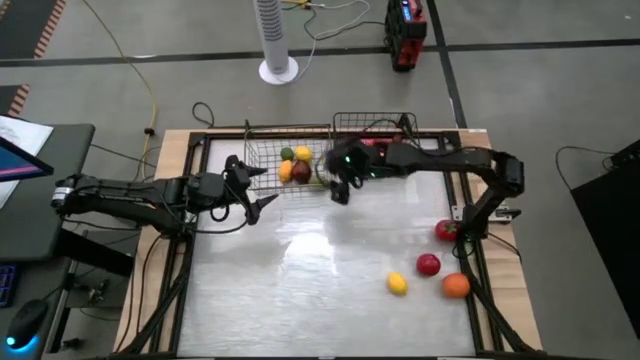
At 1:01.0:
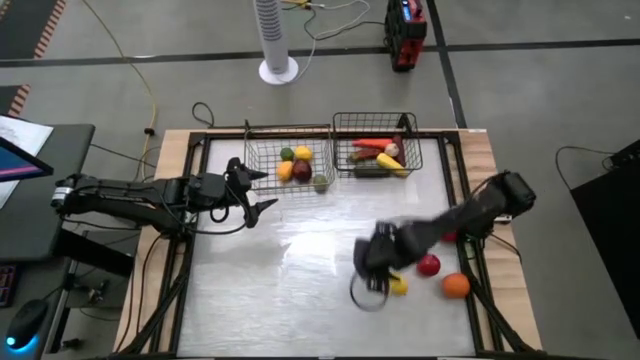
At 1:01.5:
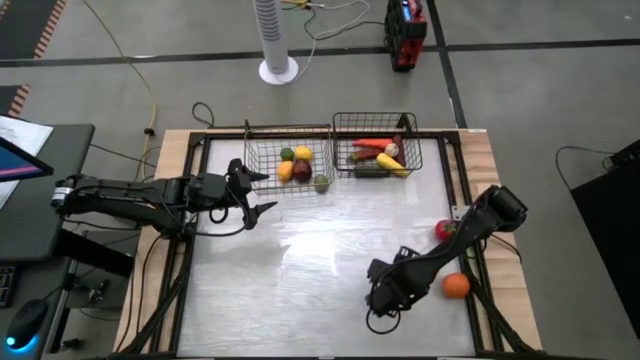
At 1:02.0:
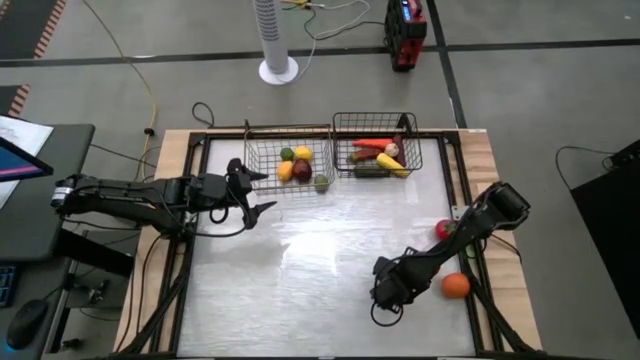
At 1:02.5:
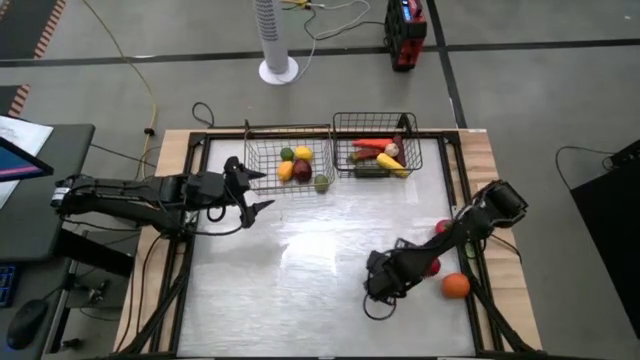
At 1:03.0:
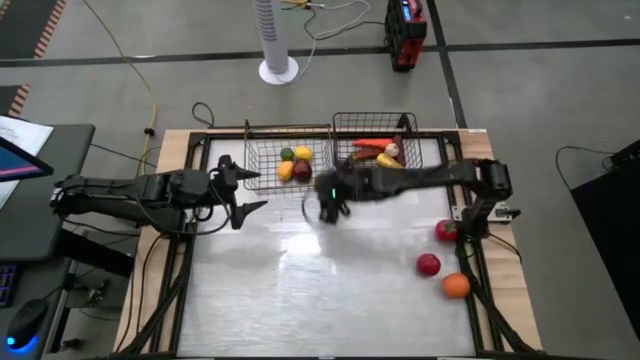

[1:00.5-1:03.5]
Task: Sort produce into baskets
Put the lemon into the left wire basket

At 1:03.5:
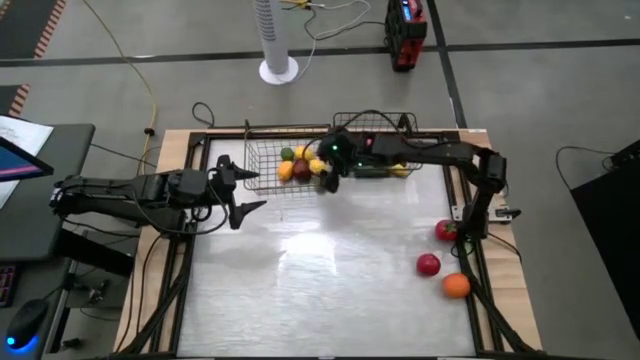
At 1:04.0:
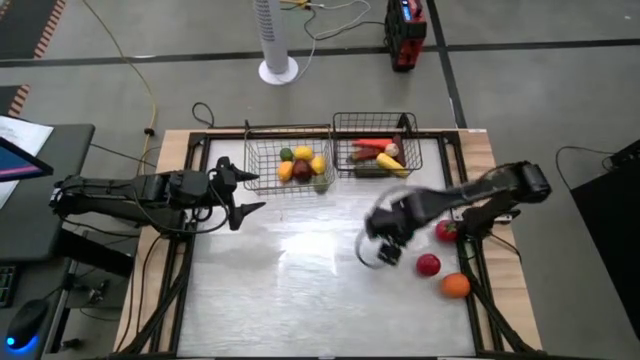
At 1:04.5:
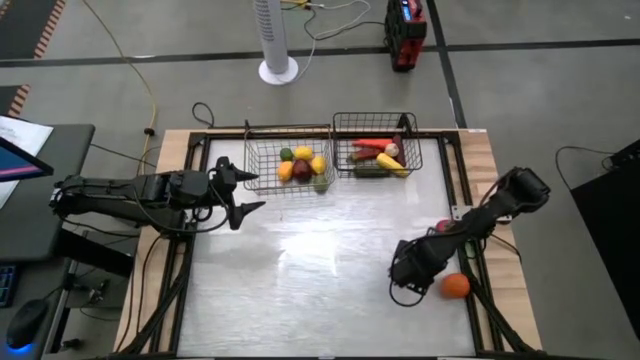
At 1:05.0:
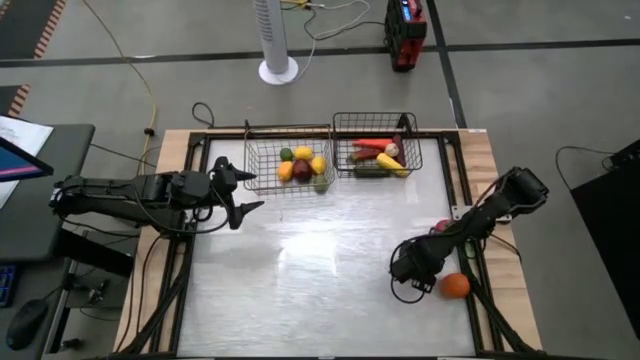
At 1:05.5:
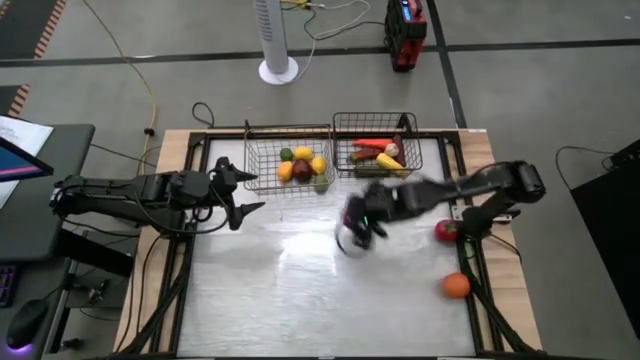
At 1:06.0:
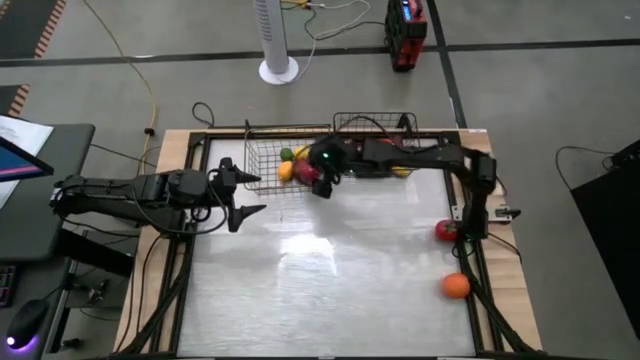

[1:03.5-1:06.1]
Put the tomato into the left wire basket

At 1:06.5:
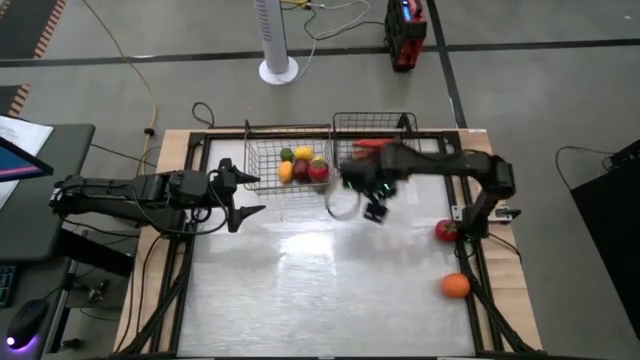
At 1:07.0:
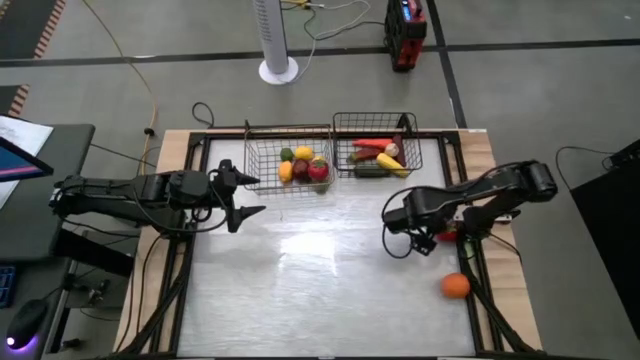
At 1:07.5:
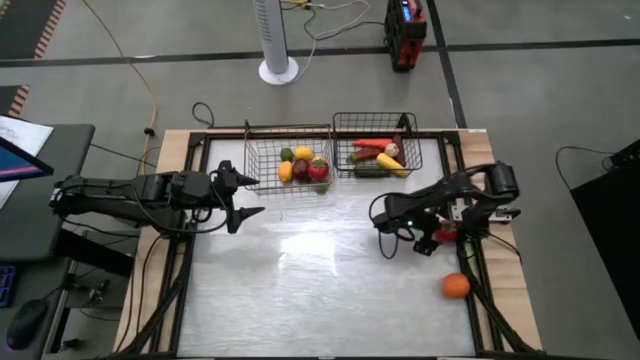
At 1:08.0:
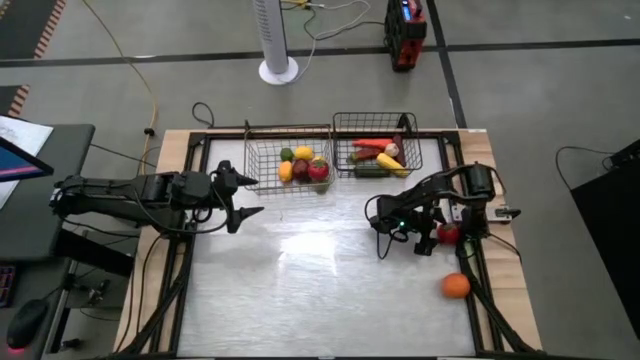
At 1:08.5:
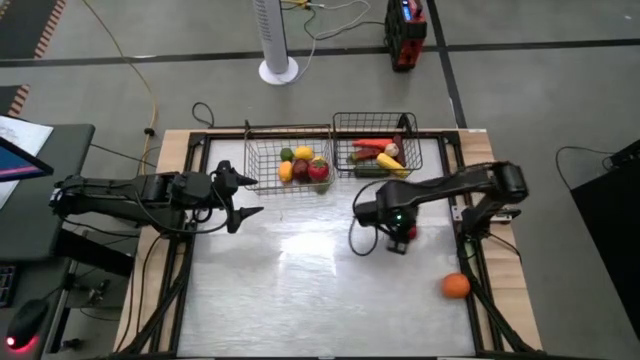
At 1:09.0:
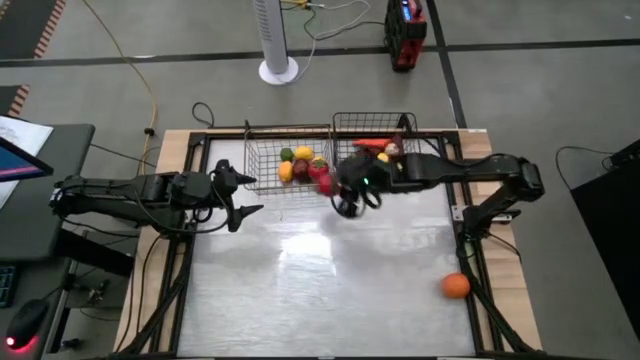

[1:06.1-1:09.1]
Put the tomato into the left wire basket

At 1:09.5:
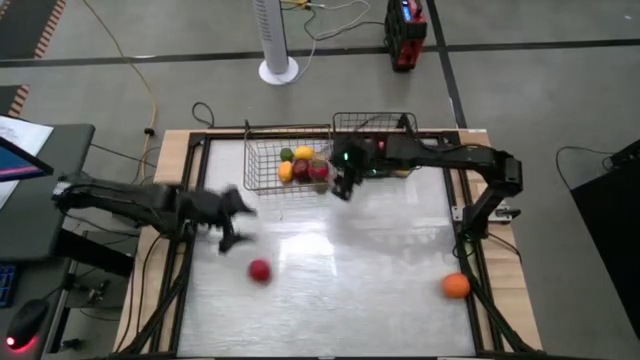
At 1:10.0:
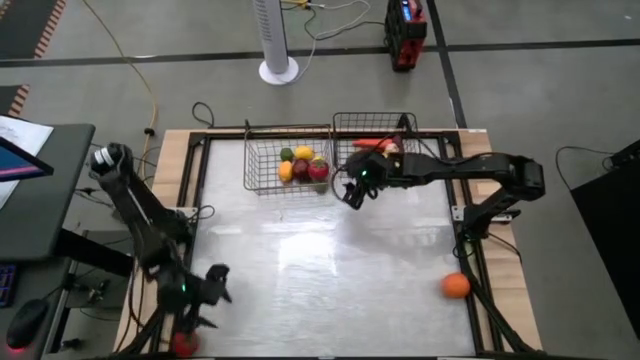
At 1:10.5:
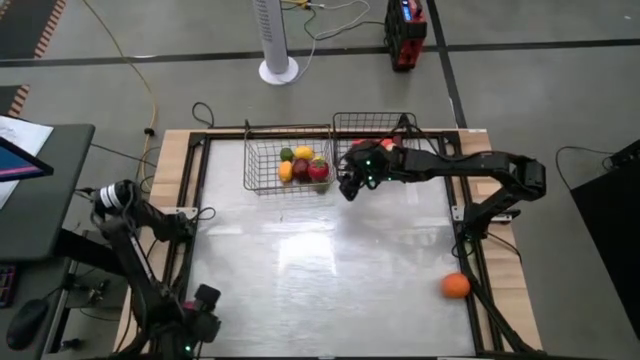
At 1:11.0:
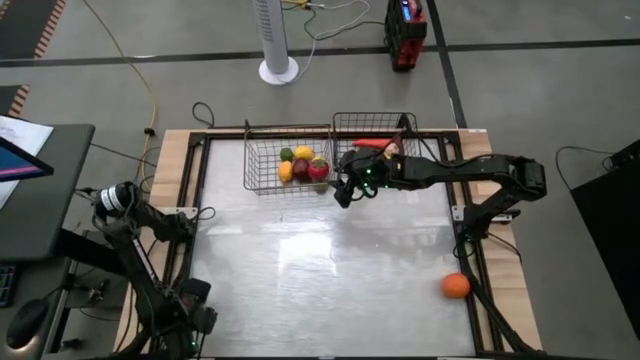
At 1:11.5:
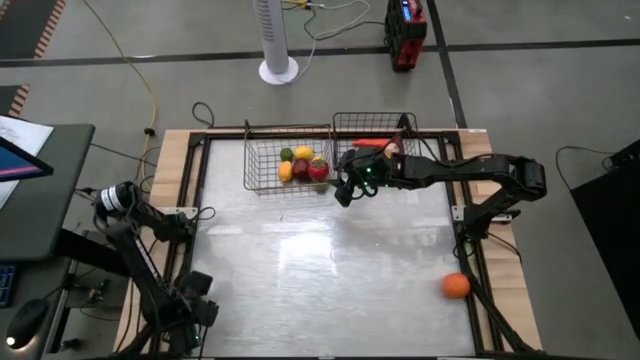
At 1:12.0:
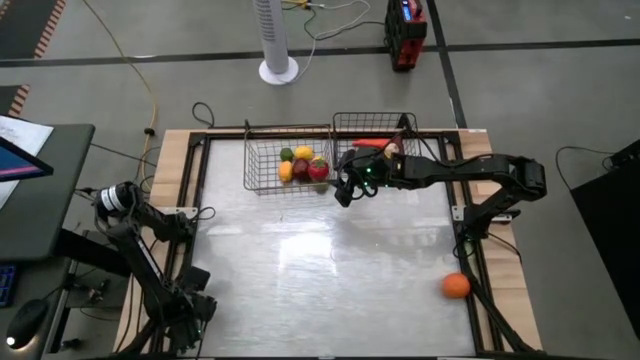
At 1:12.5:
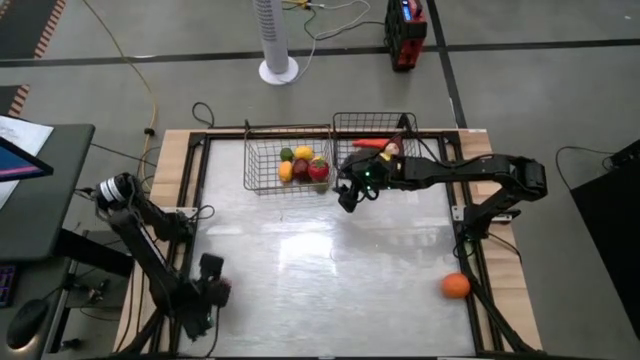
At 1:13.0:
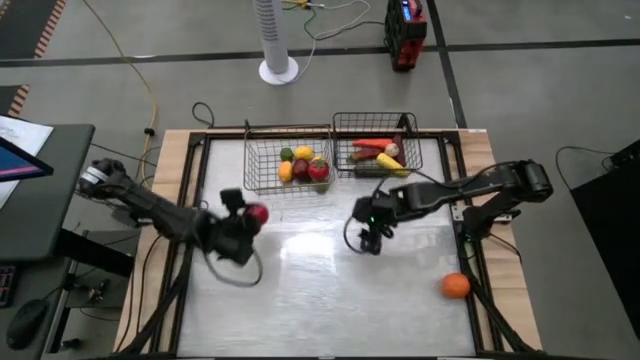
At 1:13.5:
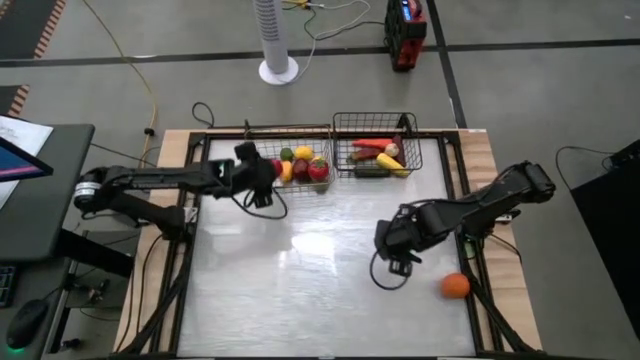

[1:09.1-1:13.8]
Put the tomato into the left wire basket

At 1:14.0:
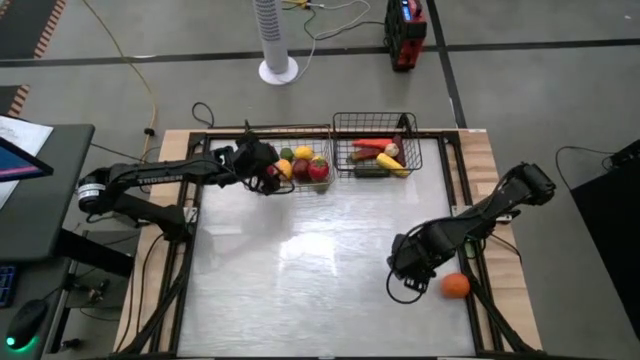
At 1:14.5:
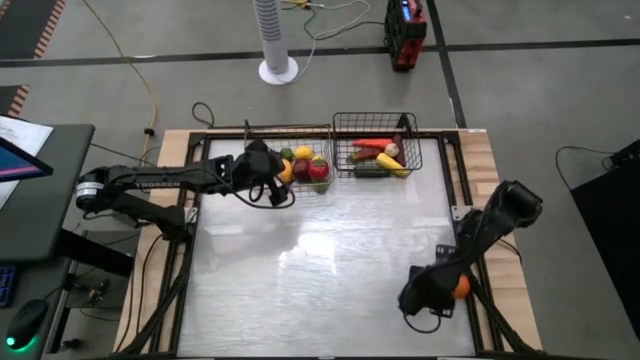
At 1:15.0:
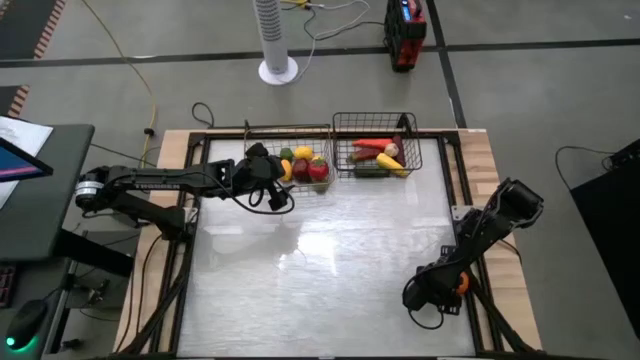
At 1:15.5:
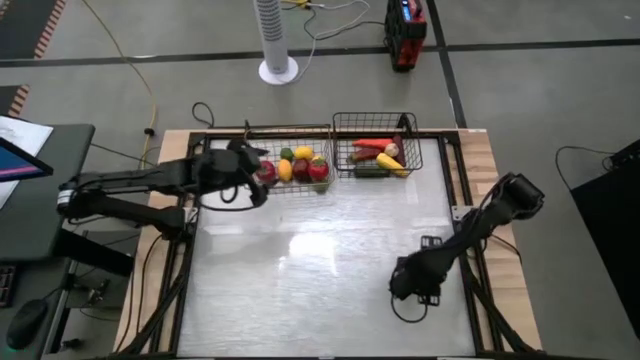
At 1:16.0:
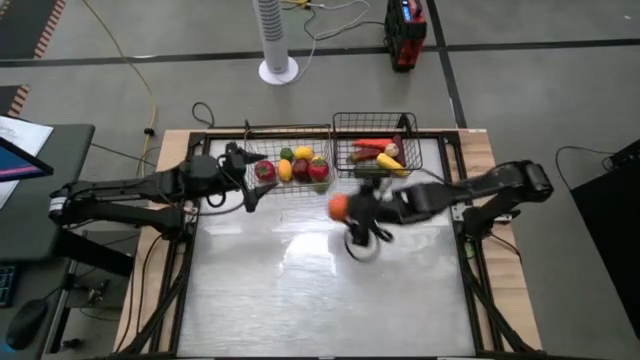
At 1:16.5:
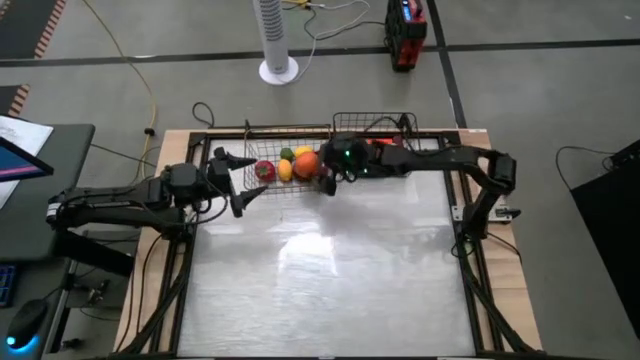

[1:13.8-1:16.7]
Put the orange into the left wire basket

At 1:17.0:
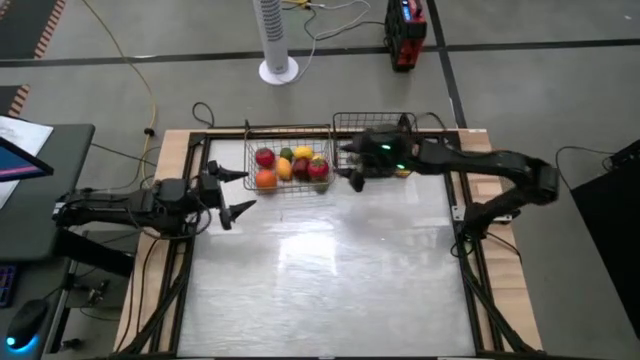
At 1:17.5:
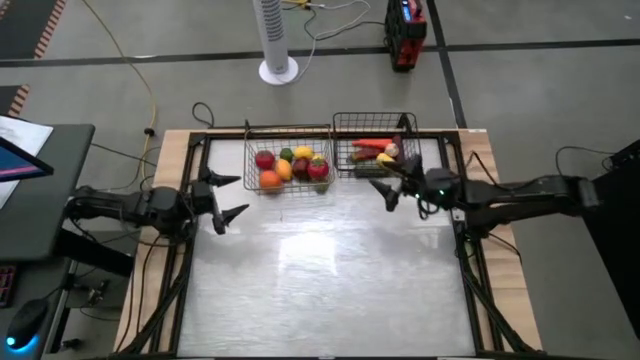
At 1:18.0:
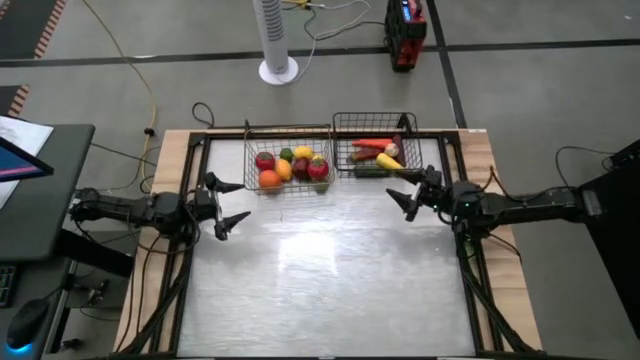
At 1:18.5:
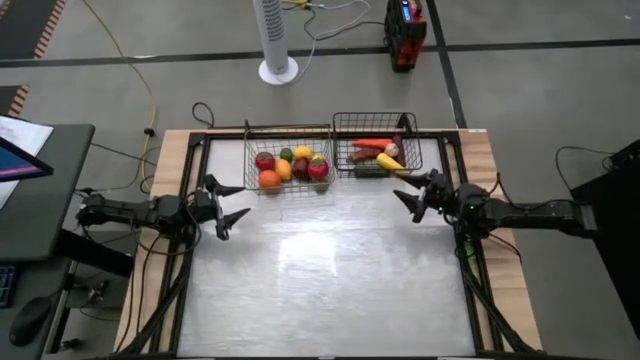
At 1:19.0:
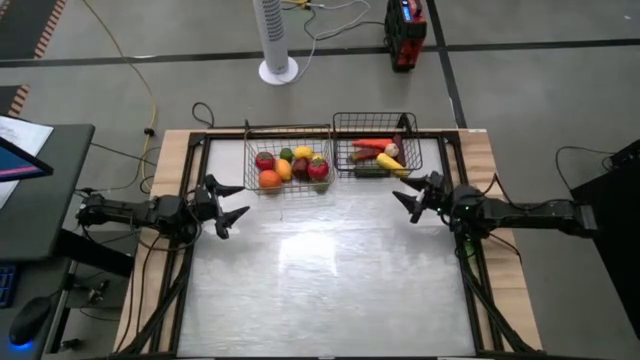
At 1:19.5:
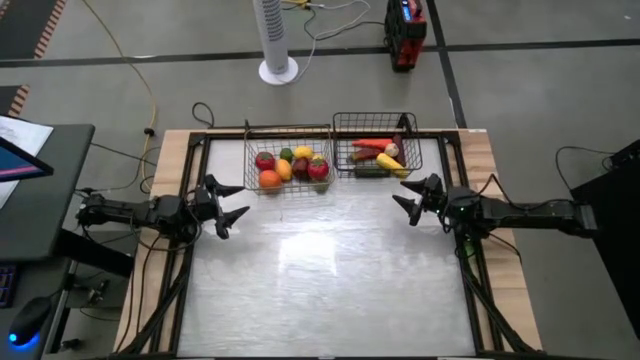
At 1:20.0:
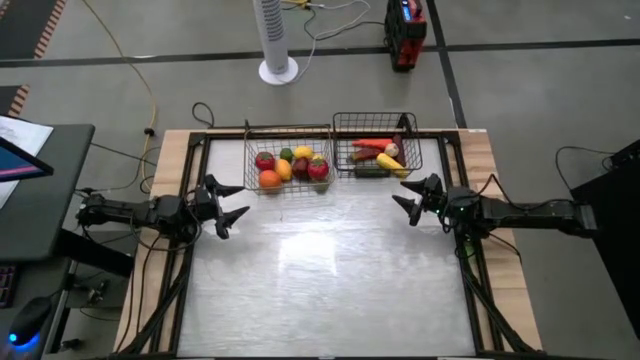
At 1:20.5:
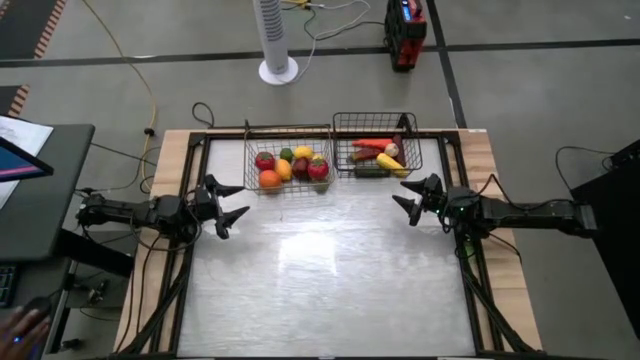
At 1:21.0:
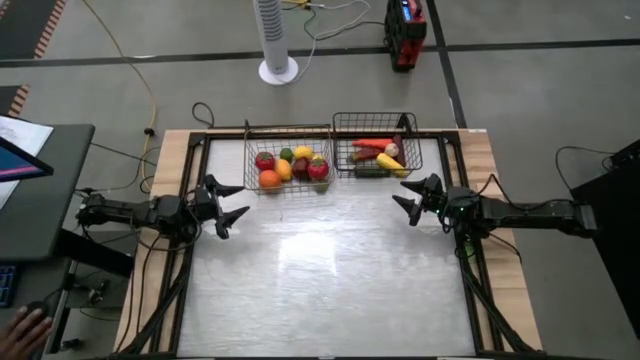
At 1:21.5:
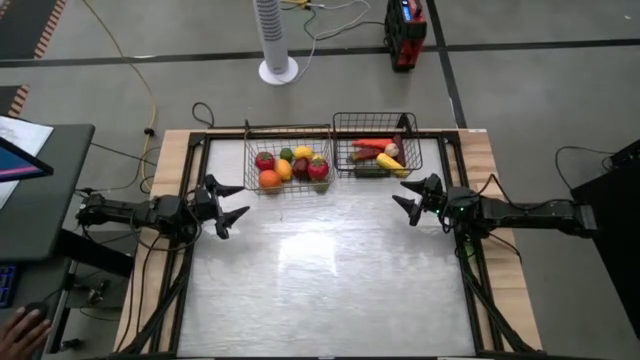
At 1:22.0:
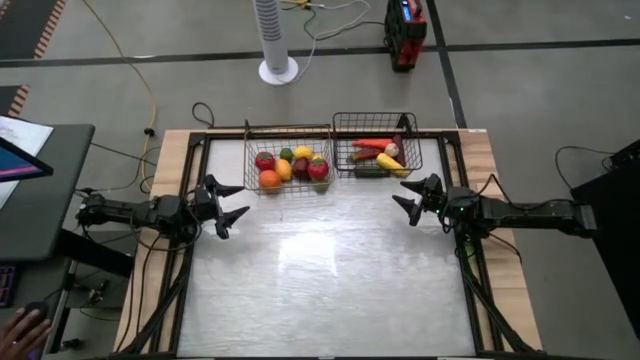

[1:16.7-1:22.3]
Return to Home Position
